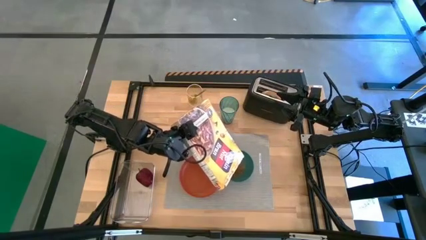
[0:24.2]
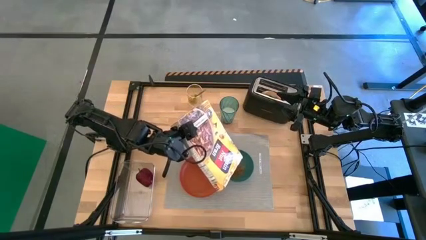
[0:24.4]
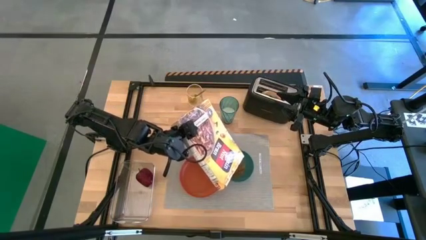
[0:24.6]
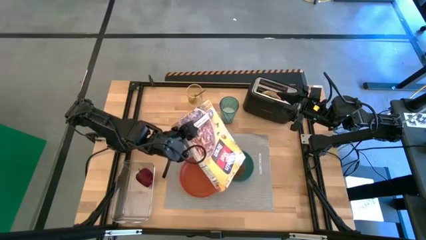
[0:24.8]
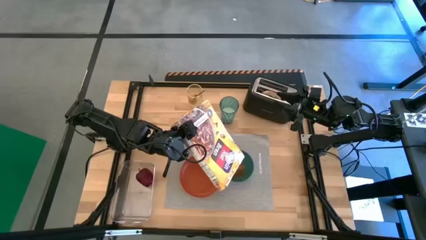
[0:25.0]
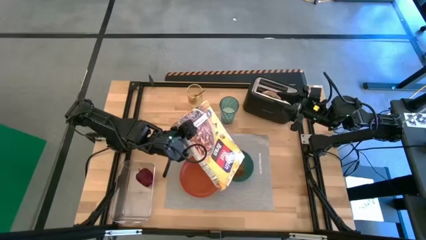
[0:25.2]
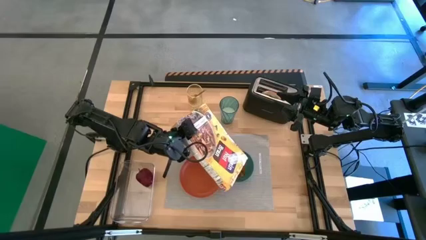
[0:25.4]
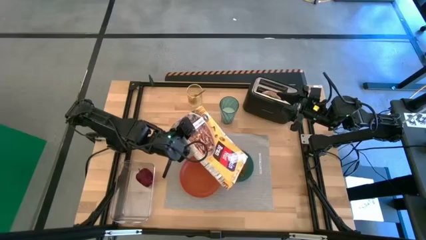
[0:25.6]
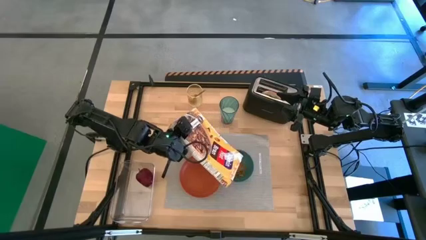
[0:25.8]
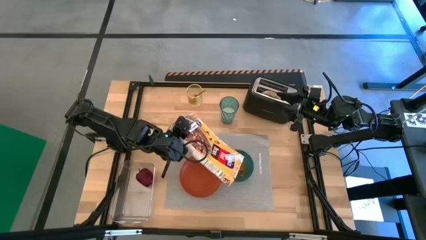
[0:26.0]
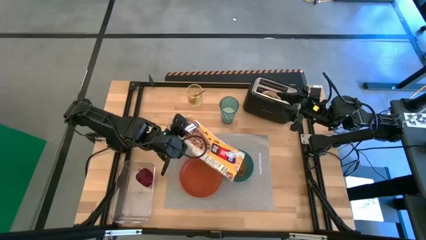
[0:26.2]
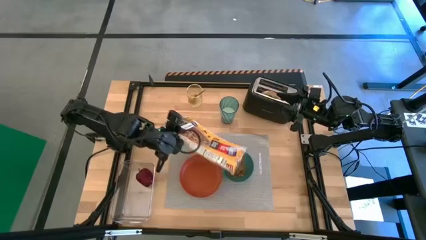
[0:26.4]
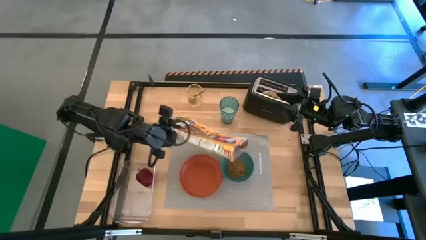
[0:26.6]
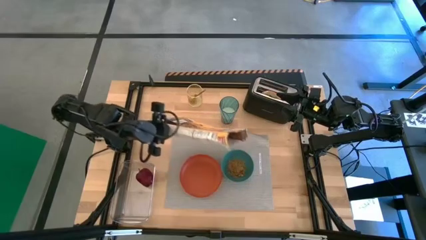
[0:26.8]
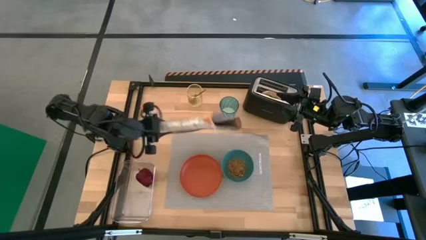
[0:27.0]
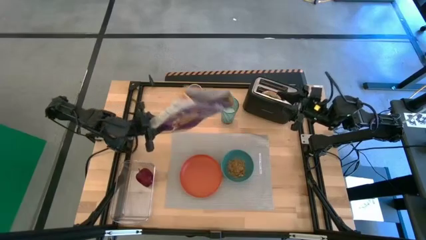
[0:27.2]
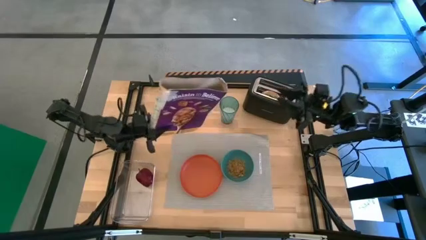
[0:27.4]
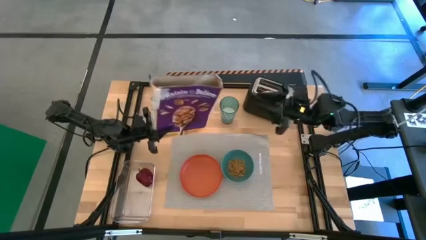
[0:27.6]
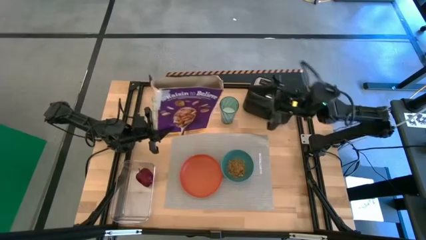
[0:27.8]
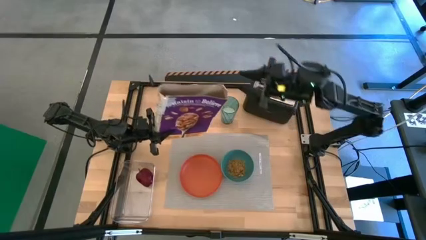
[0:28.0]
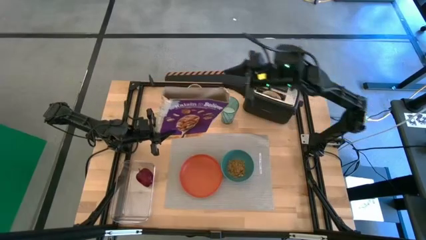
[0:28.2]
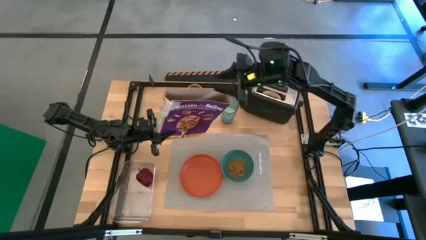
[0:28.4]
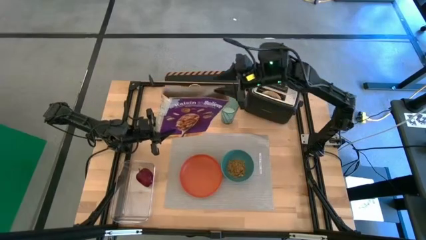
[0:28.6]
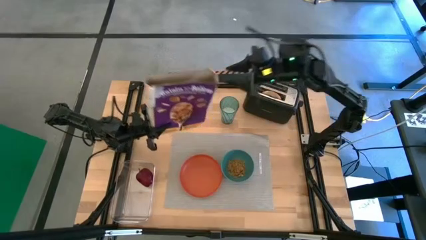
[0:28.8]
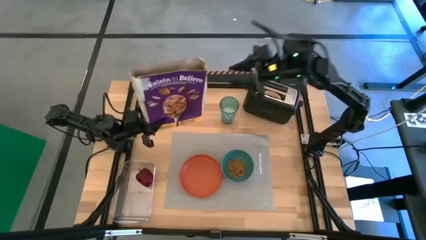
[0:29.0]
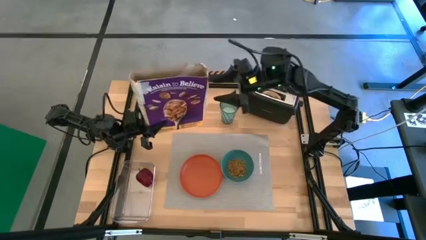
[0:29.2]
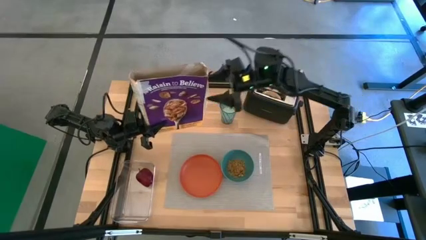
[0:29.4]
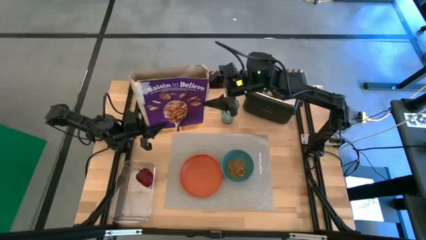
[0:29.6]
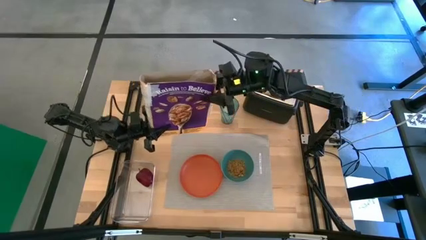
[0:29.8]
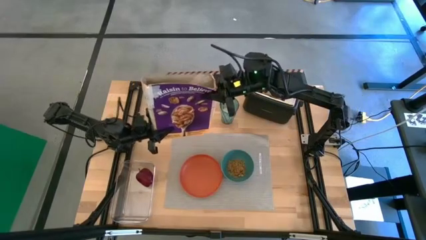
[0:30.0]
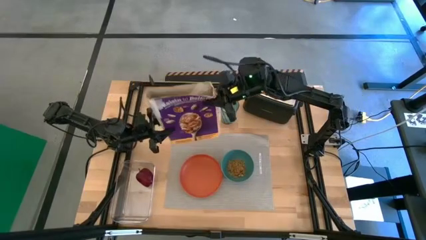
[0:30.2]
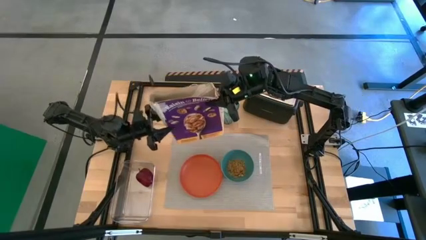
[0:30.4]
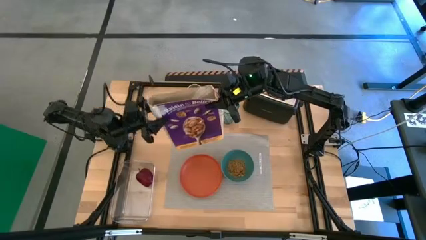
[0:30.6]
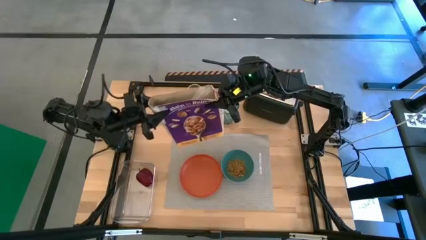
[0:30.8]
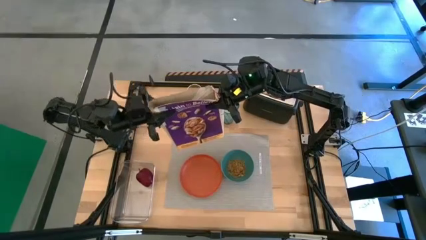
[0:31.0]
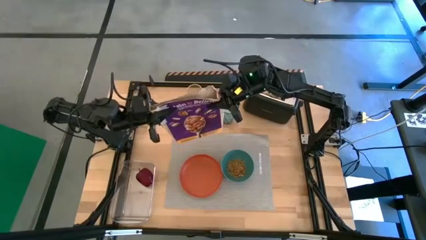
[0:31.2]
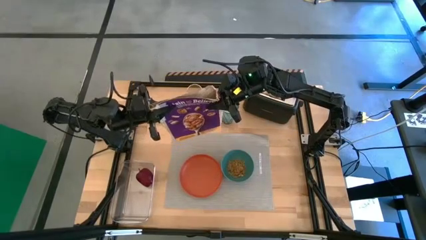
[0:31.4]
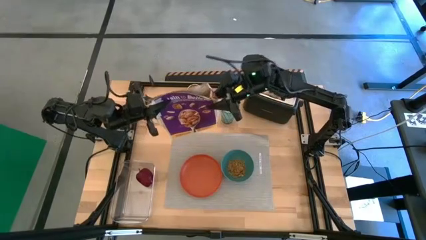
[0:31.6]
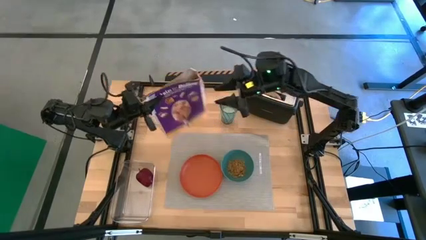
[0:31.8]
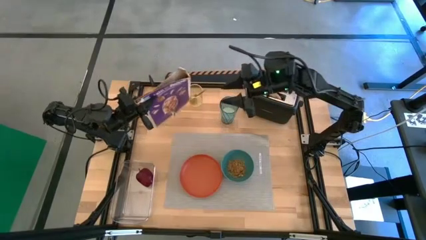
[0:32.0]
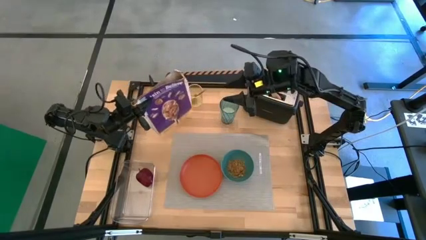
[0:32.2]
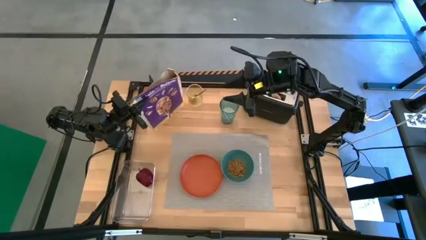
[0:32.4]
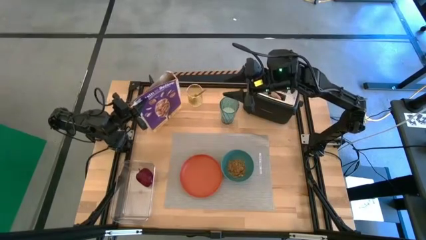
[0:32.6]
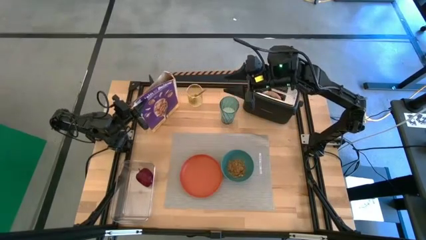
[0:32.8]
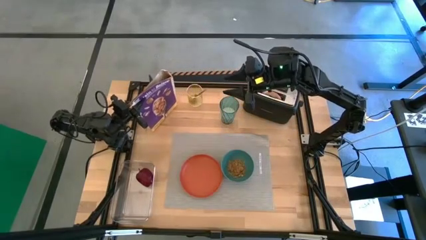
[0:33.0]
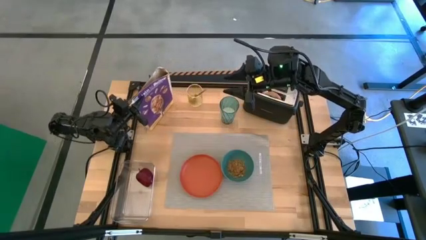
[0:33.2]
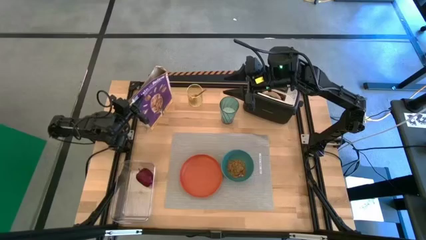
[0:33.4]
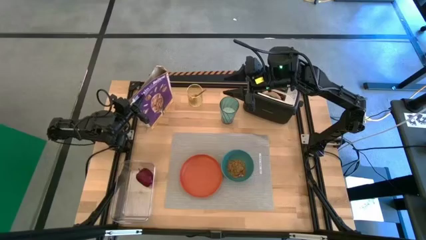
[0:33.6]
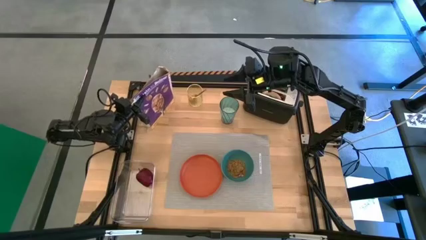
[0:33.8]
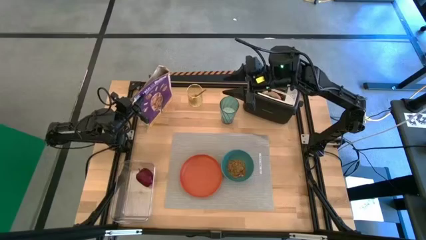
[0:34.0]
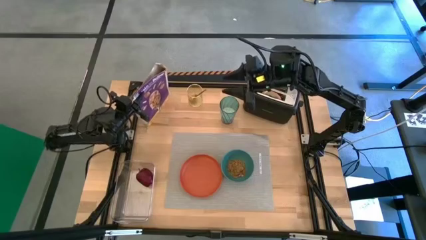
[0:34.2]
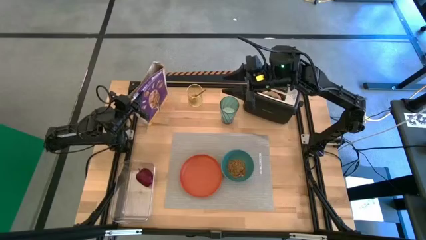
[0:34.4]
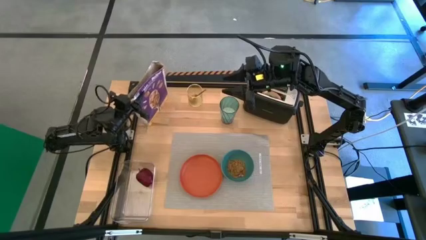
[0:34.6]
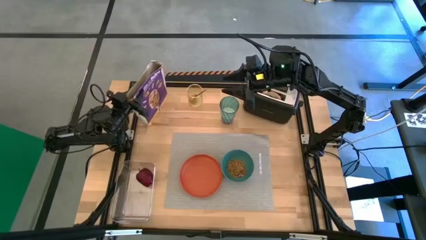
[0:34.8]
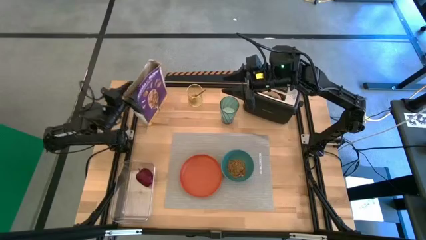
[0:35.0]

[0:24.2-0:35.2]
Task: Arrange a breakfast setting
Pour the cereal into the blue bowl from the cereal box
